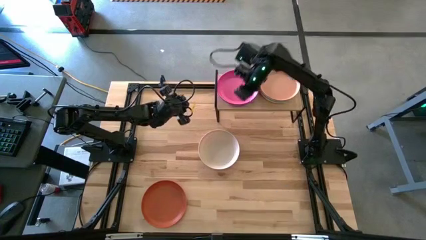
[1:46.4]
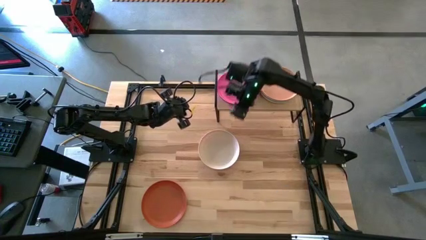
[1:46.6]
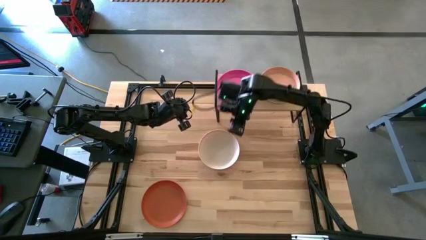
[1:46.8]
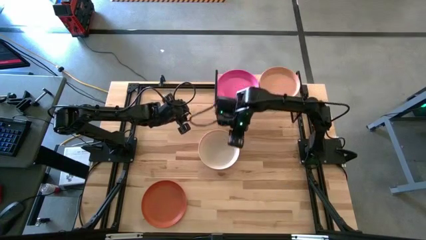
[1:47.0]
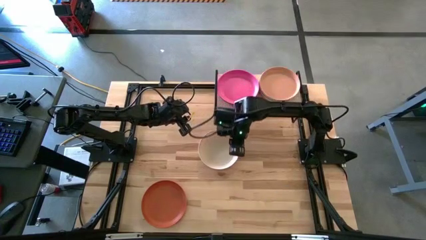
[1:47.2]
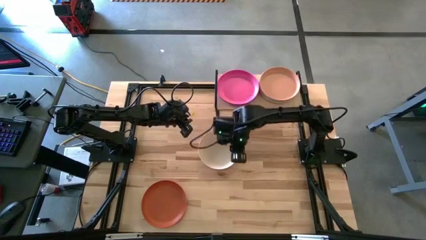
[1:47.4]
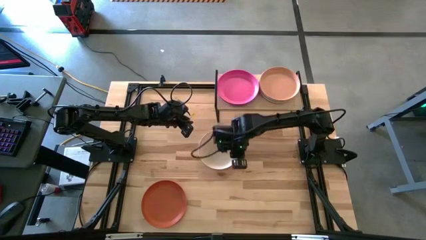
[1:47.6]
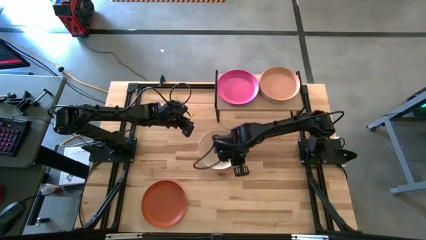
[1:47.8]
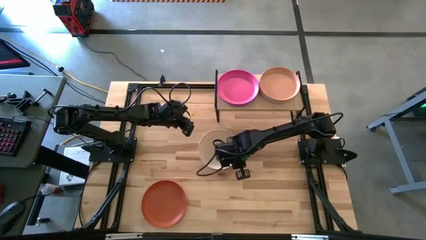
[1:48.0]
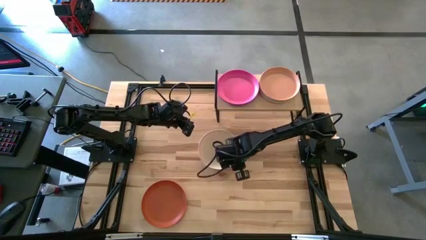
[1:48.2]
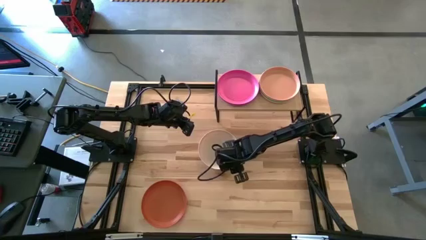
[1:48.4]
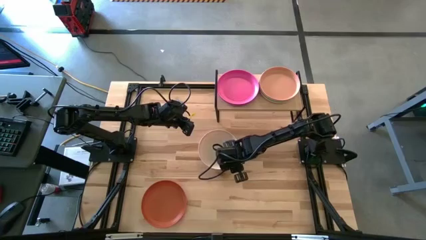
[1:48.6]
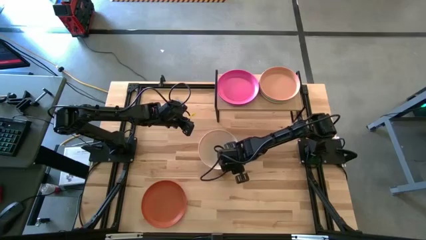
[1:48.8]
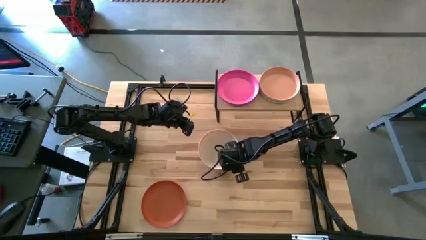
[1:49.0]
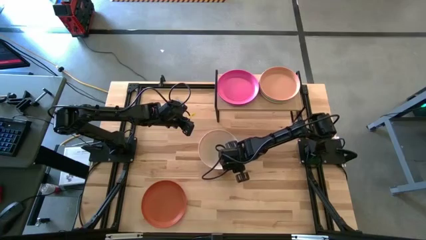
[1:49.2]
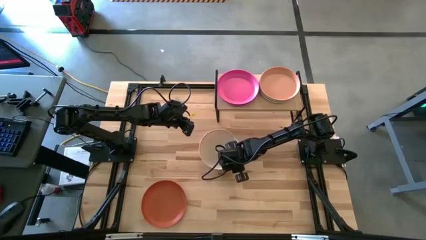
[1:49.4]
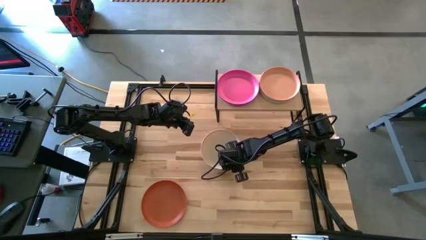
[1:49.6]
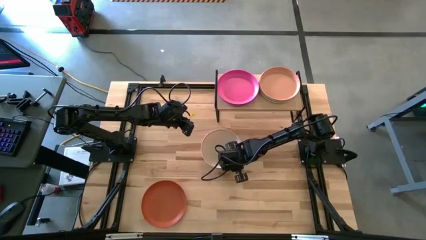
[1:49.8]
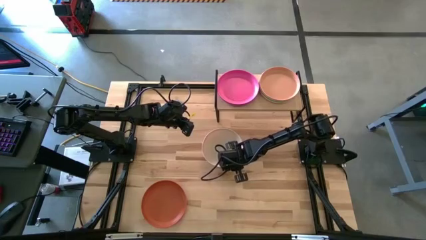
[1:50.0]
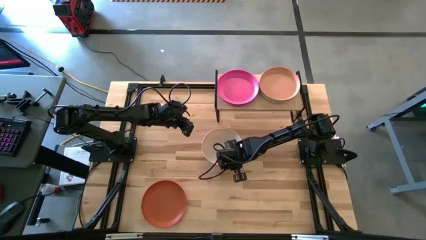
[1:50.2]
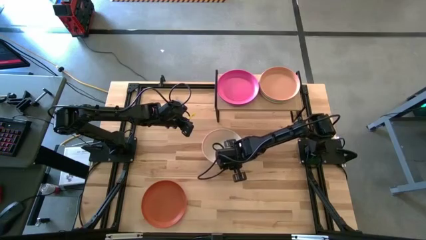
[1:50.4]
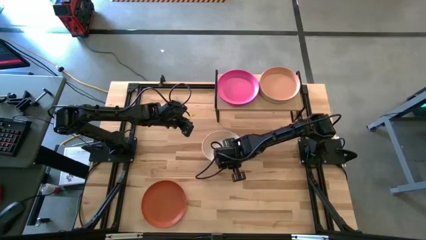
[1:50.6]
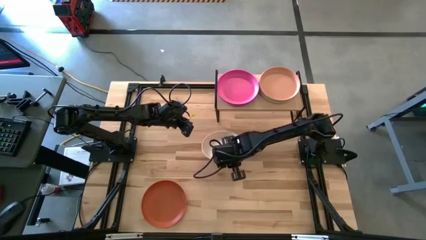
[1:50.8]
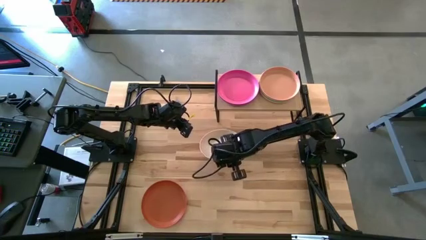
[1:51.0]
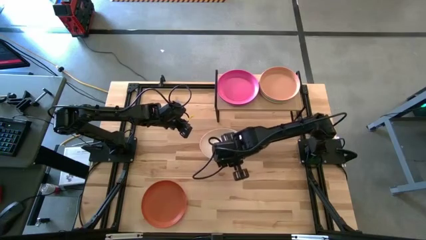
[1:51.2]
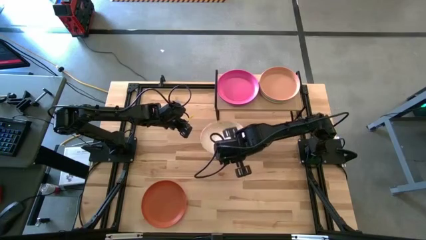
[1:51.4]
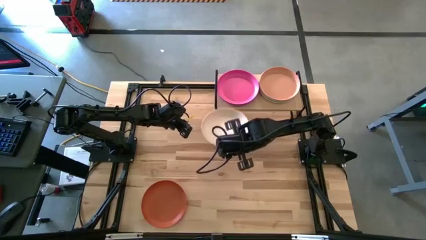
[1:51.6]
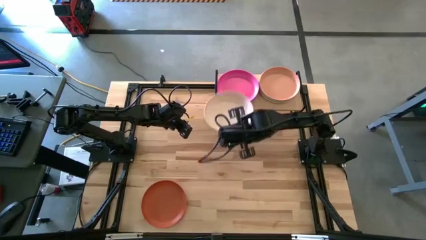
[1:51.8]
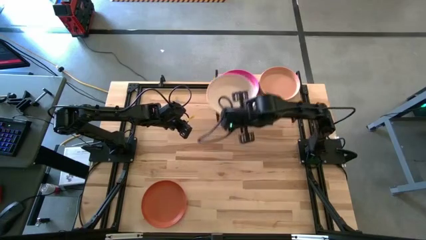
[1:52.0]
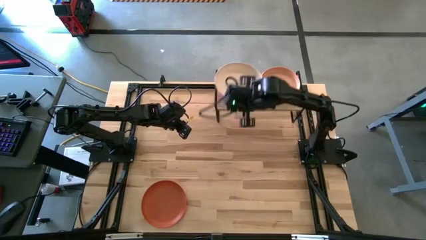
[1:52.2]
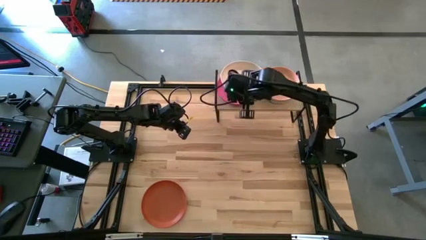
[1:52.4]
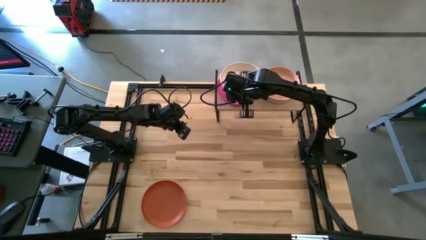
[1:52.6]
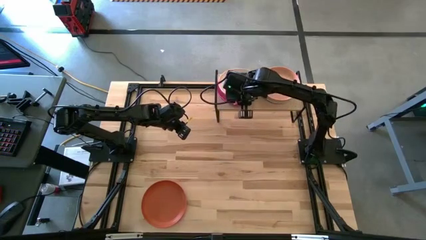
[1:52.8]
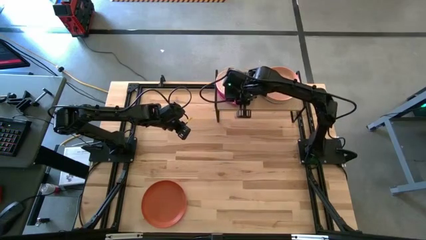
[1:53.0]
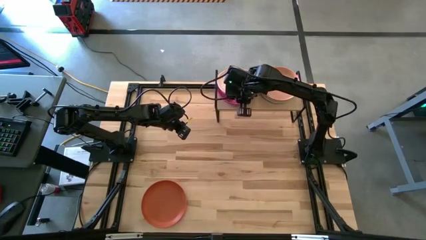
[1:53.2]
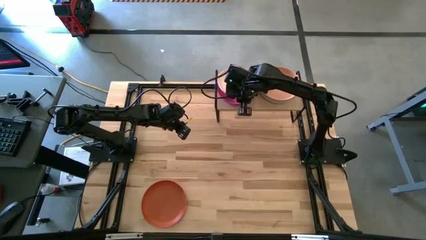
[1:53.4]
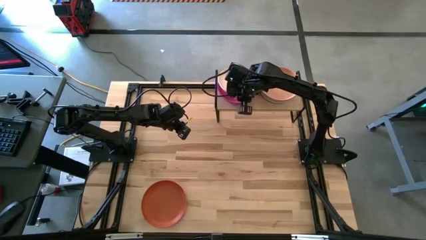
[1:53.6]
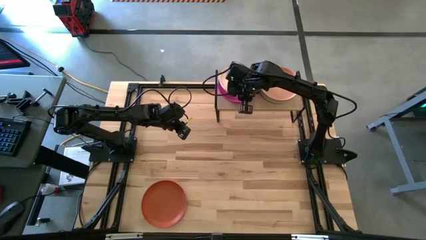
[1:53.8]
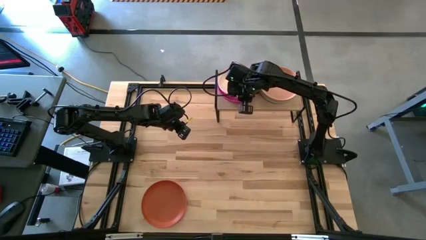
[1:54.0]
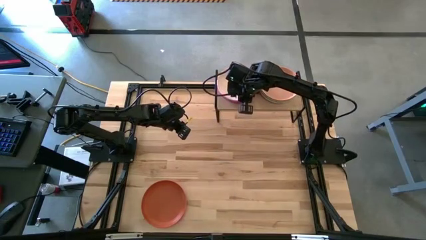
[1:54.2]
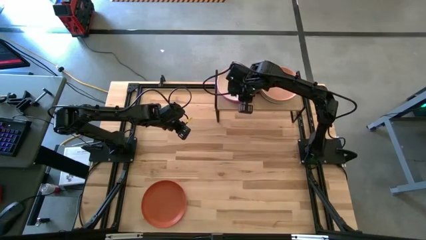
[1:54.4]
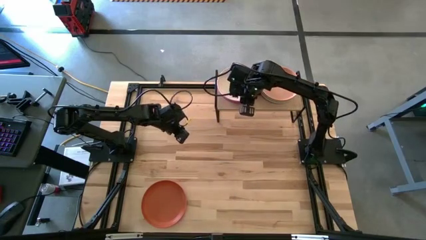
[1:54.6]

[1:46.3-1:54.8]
Task: Place and stack plates onto a shelf
Stack the white plate on top of the pink plate

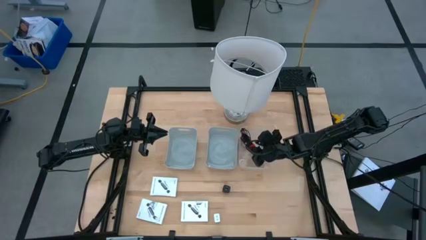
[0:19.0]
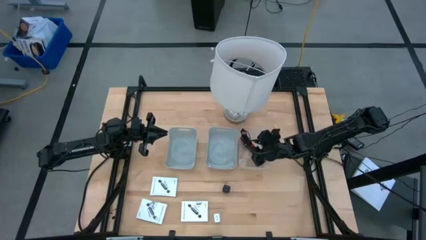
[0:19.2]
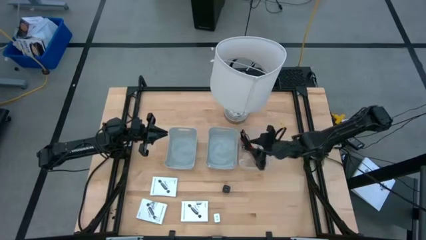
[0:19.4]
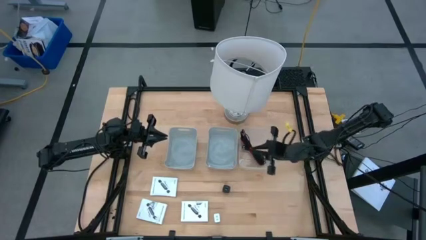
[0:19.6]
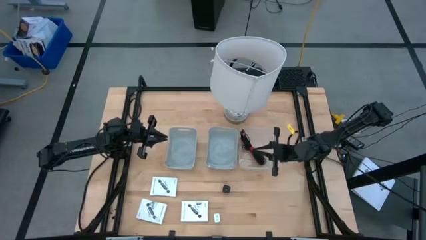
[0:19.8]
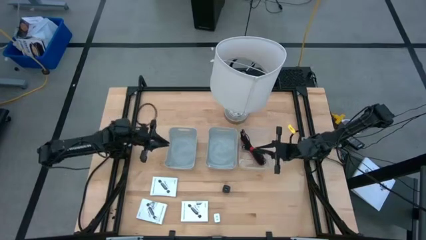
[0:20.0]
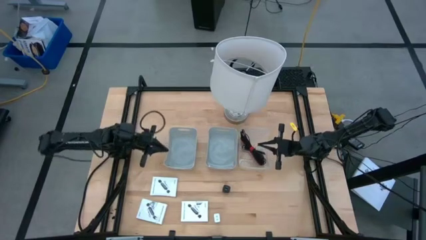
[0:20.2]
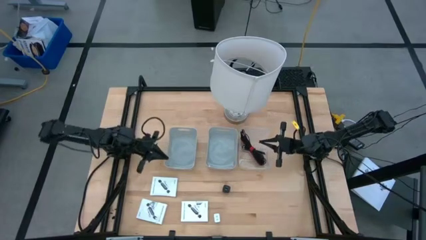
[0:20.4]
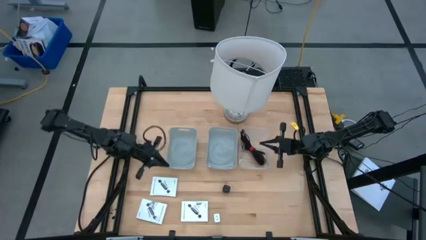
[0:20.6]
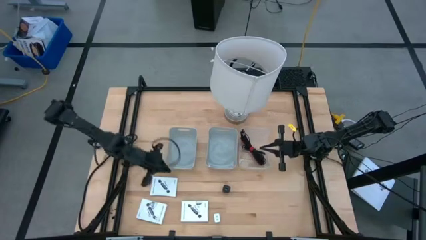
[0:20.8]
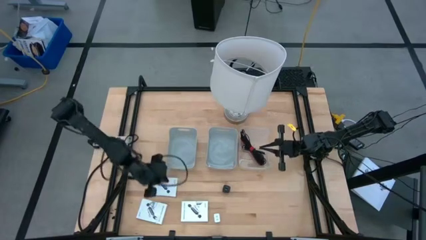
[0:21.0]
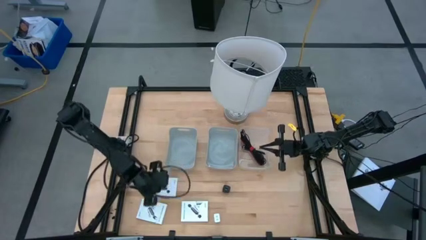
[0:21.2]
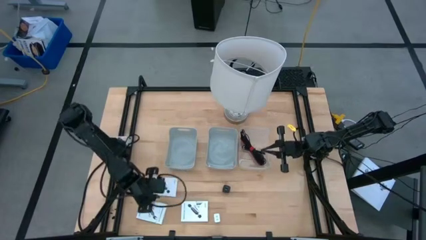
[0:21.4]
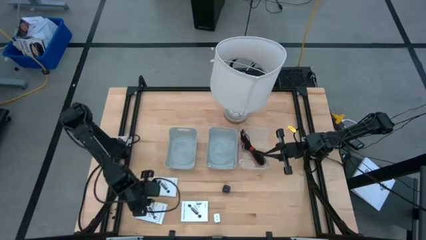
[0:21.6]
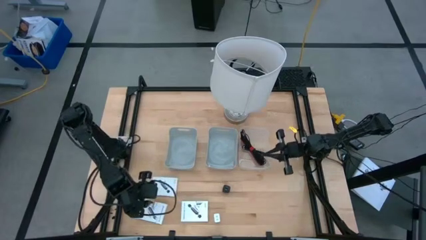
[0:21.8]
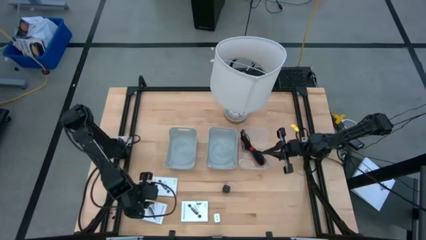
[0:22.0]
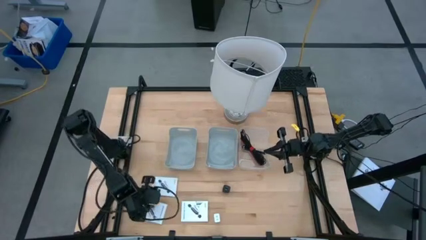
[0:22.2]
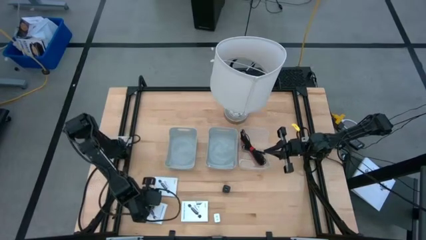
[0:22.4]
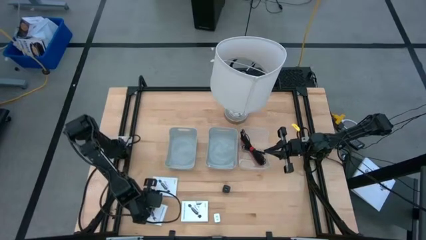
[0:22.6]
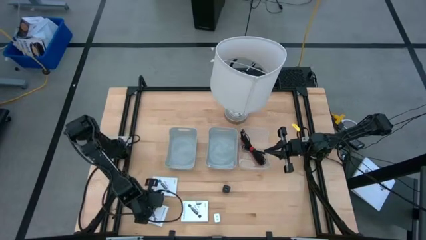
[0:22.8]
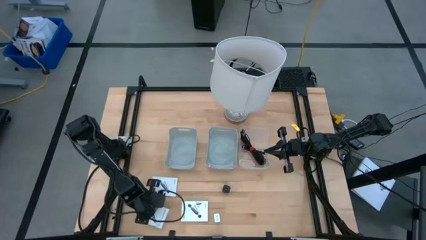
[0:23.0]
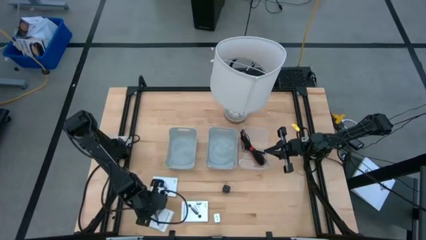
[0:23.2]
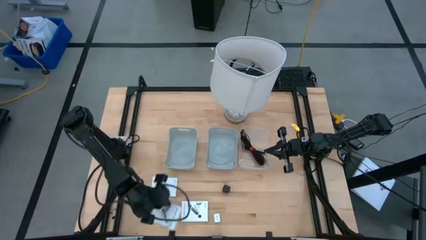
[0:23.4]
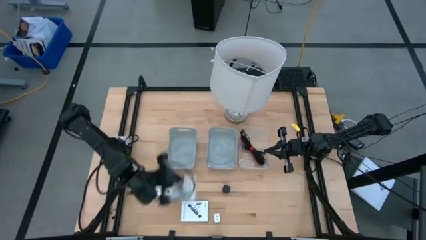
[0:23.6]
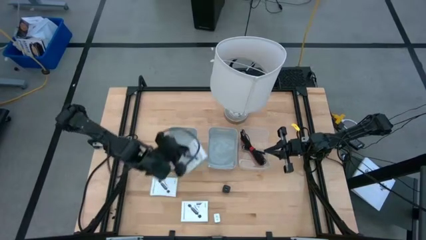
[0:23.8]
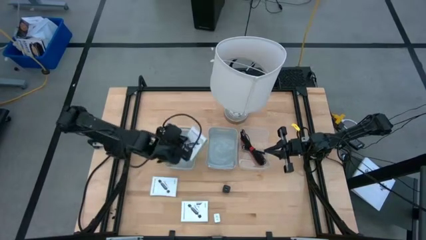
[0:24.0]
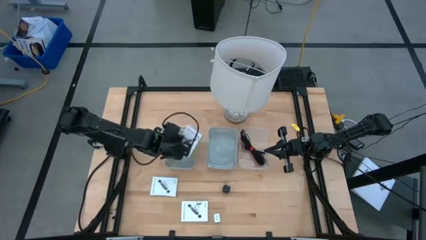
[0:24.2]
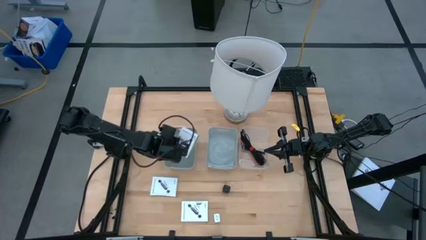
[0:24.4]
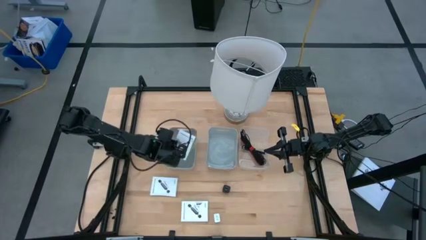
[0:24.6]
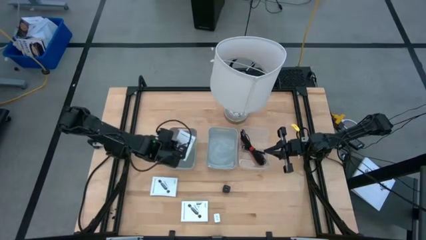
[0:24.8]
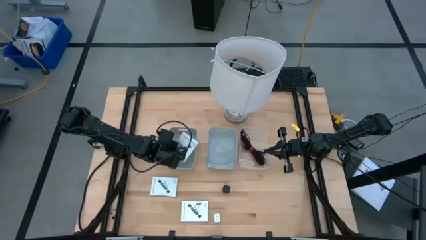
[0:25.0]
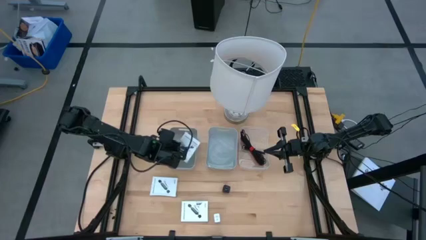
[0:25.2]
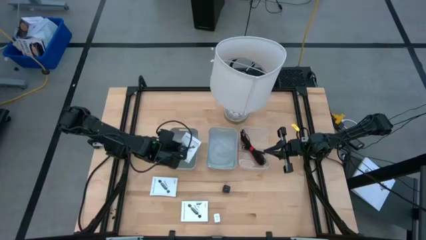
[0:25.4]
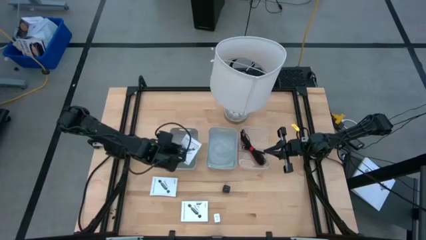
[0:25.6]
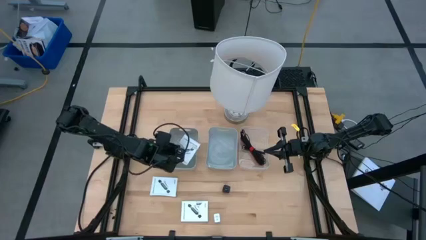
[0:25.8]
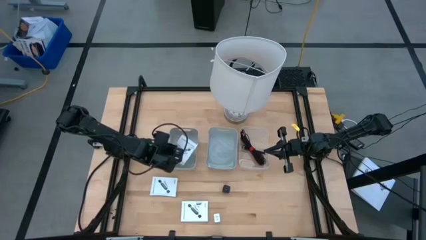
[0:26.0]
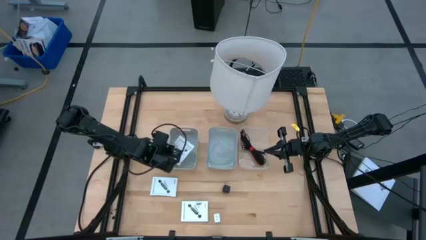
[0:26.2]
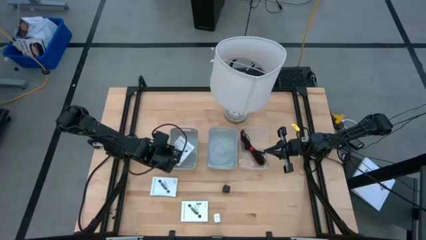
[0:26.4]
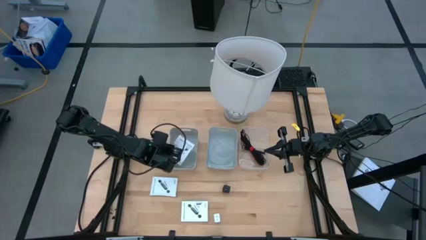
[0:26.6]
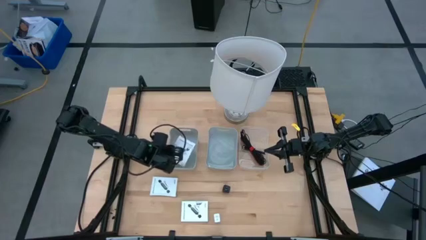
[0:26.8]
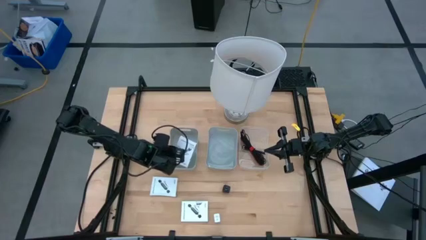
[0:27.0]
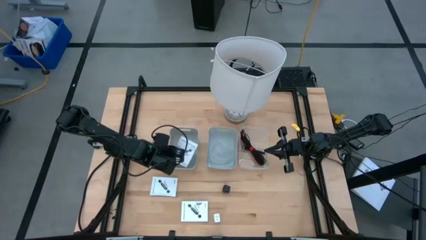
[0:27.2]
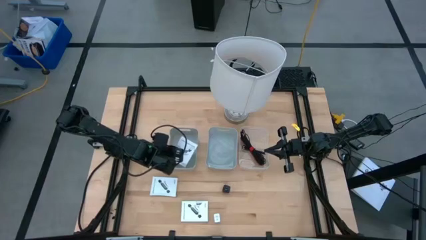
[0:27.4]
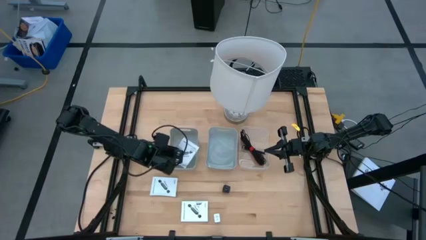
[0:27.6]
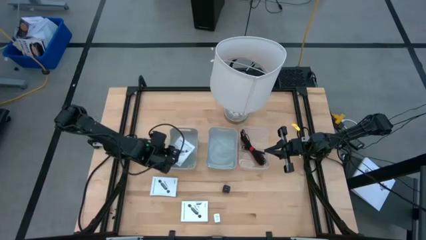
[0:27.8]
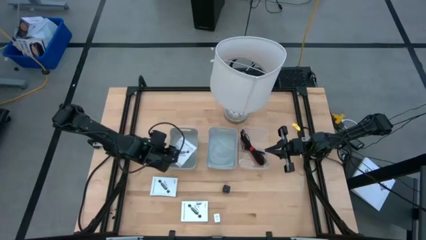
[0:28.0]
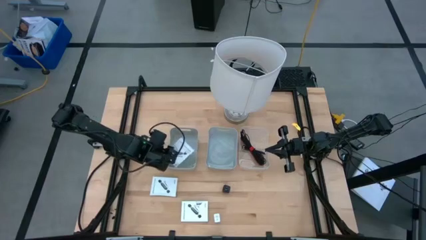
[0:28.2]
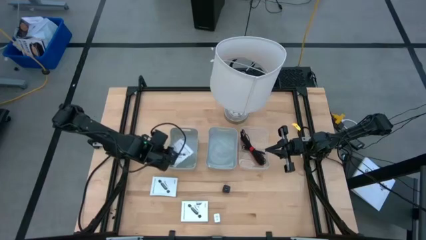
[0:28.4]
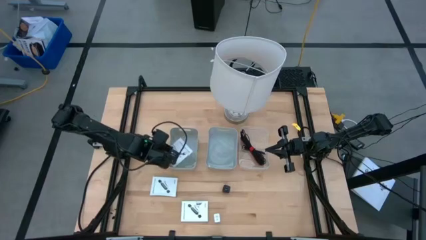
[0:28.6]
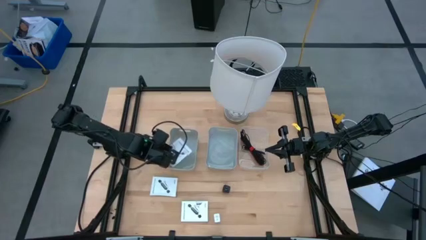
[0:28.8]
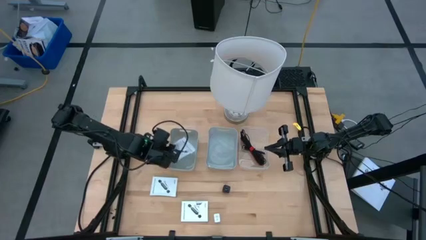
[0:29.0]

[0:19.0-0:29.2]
Task: Pick and place items into bin
Put the bottom left card reader box into the left gray bin
